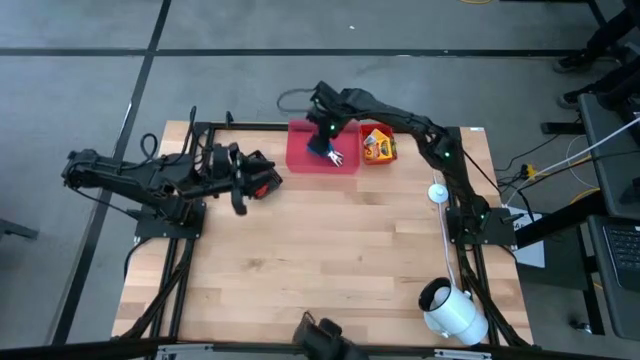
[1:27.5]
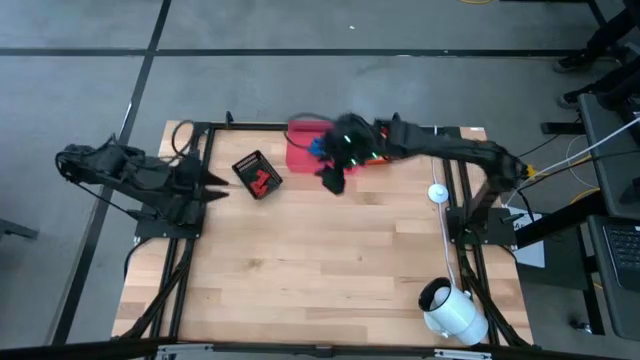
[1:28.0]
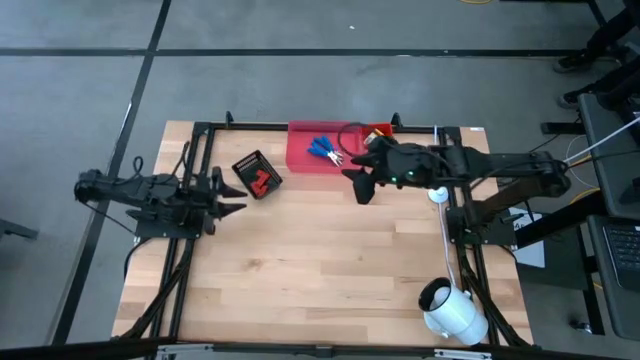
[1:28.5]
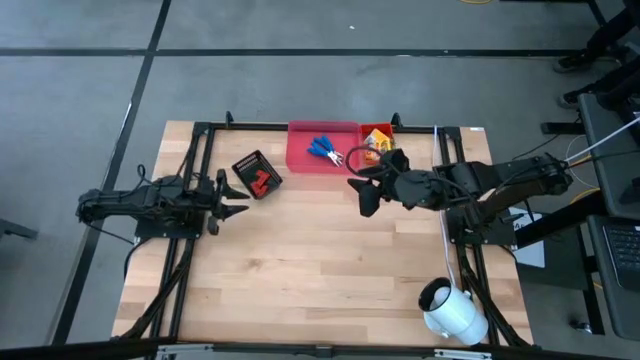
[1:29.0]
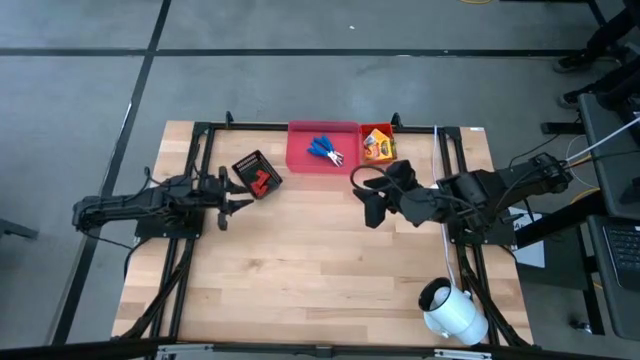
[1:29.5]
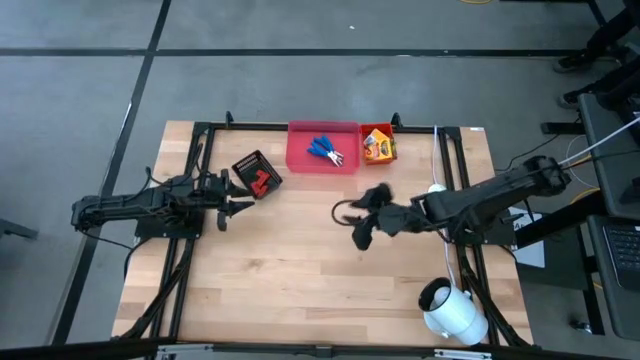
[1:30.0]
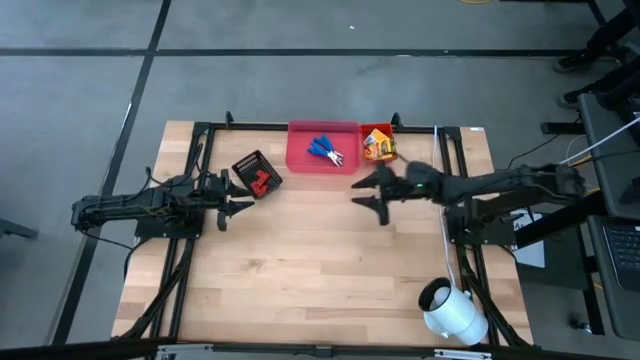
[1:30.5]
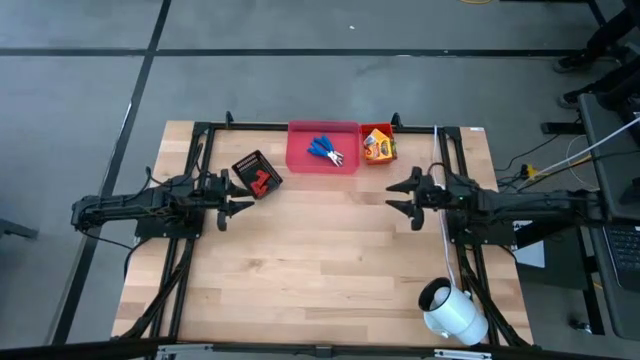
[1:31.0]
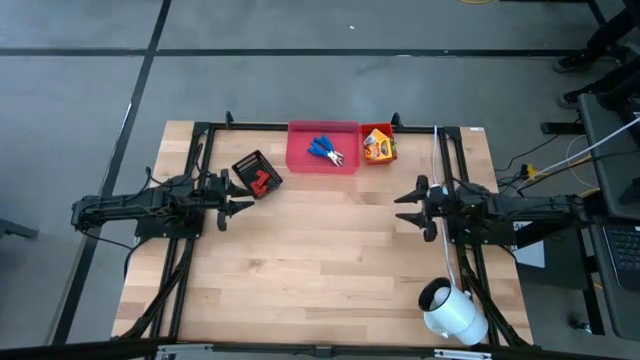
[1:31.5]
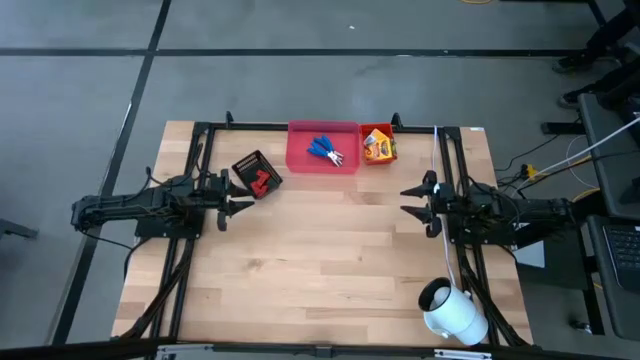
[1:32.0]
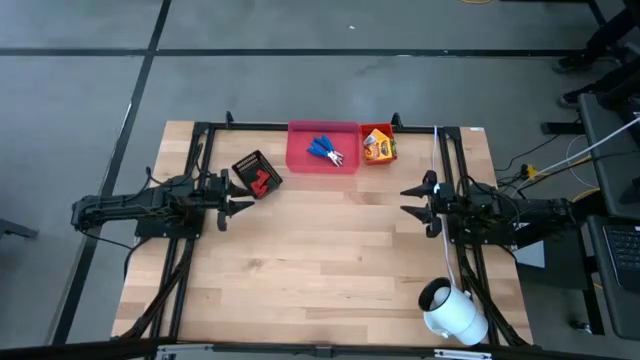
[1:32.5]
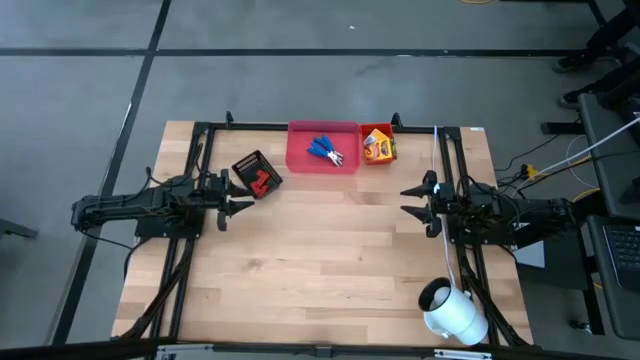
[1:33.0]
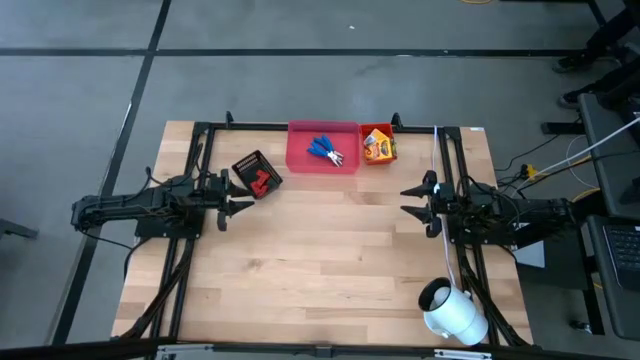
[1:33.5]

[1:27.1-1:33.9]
Task: Pick & Place School Supplies
Return to Home Position

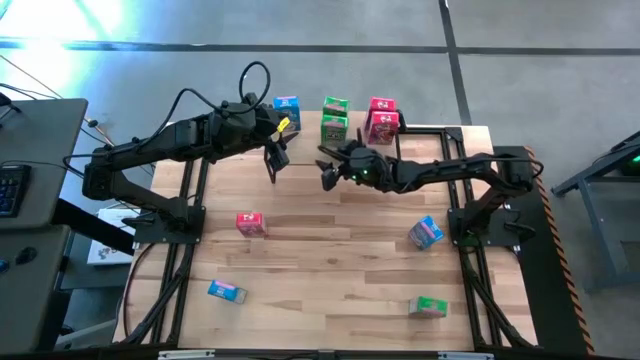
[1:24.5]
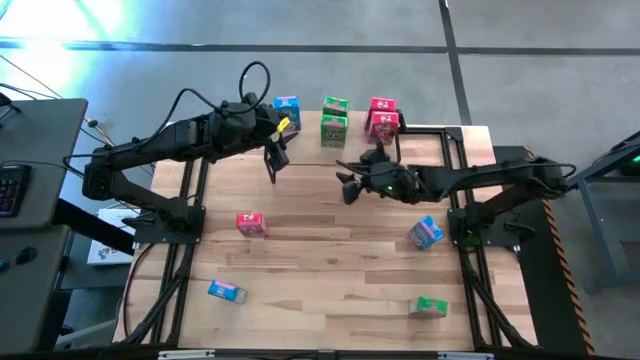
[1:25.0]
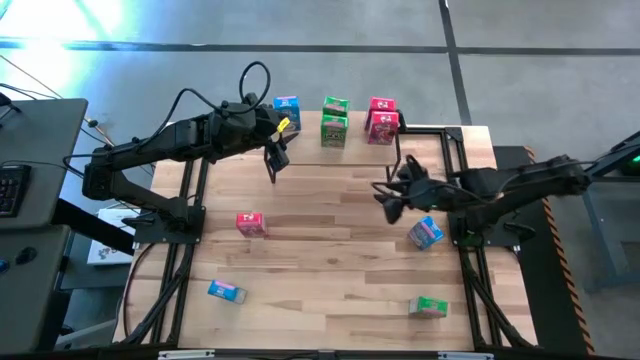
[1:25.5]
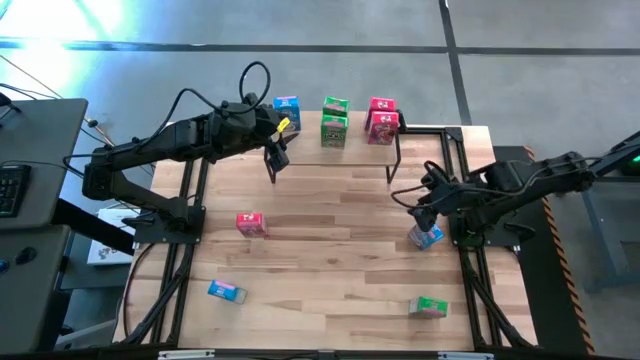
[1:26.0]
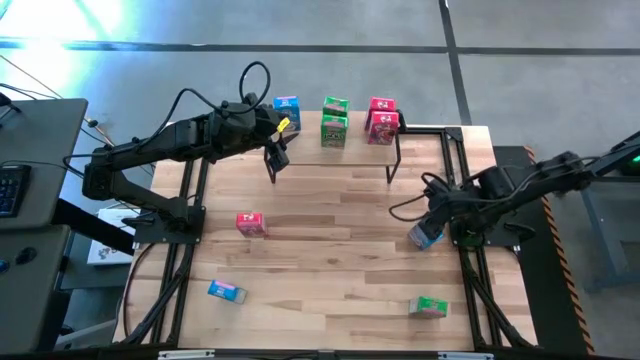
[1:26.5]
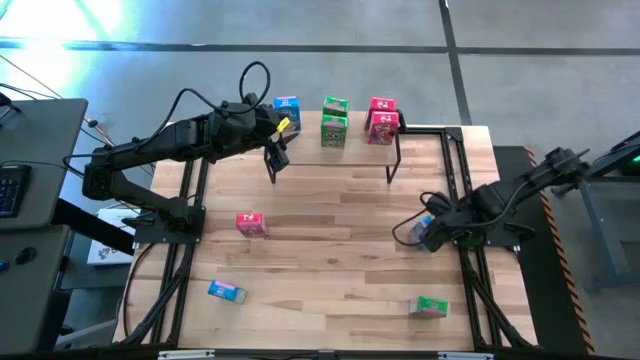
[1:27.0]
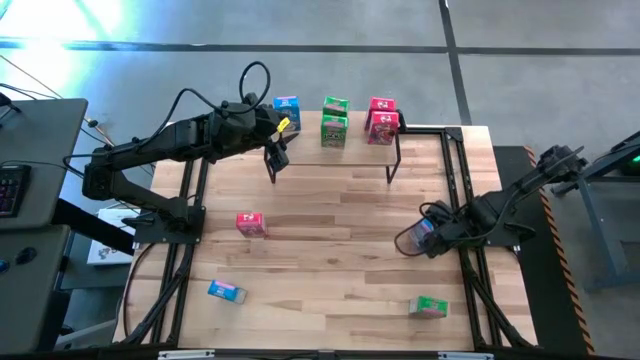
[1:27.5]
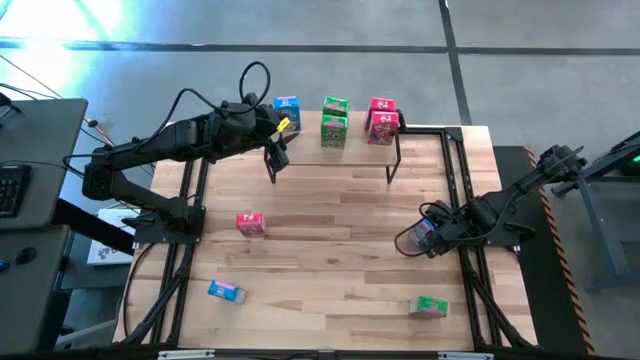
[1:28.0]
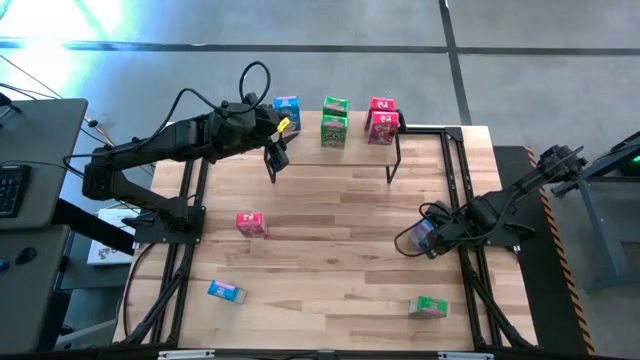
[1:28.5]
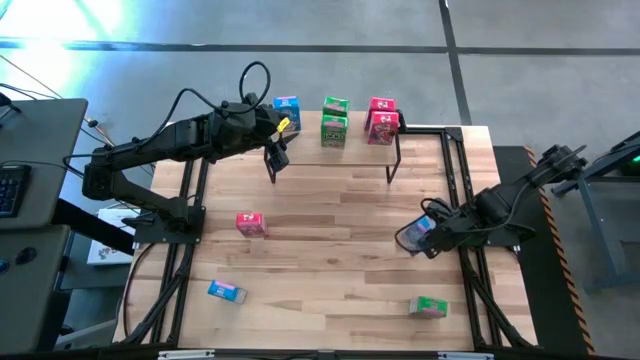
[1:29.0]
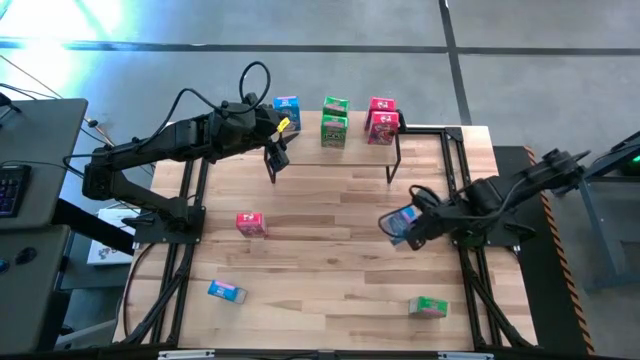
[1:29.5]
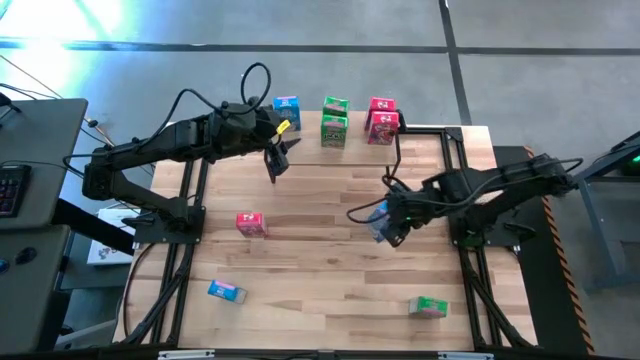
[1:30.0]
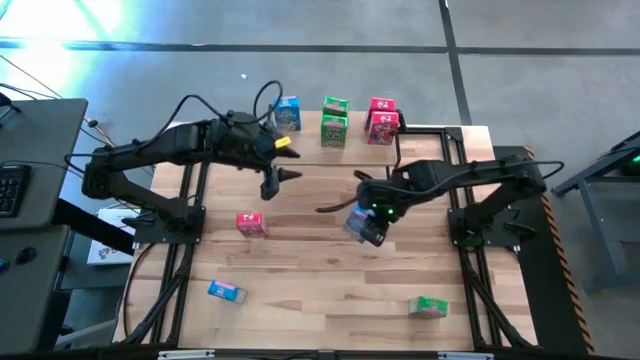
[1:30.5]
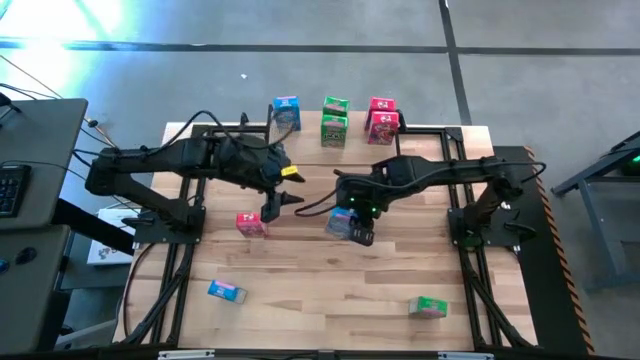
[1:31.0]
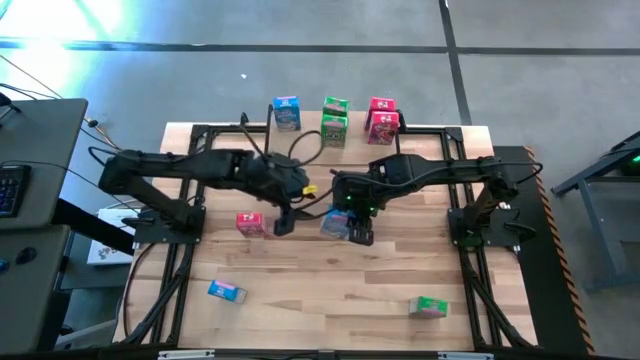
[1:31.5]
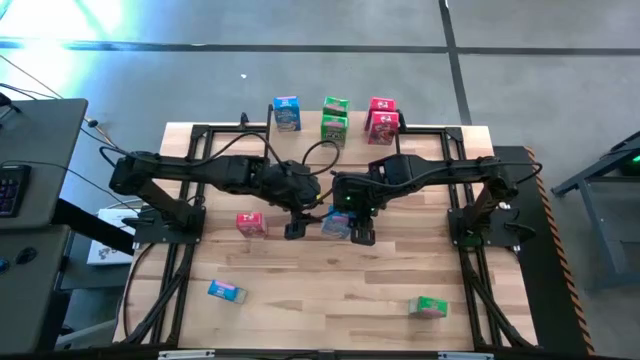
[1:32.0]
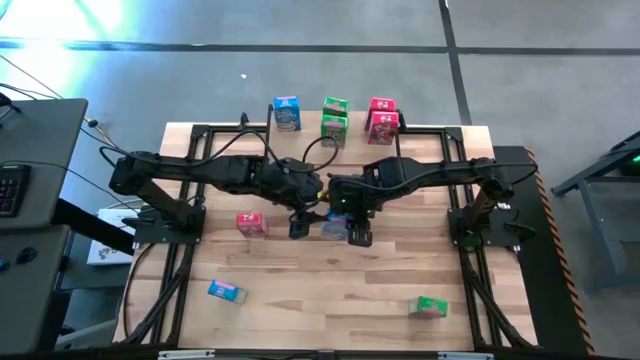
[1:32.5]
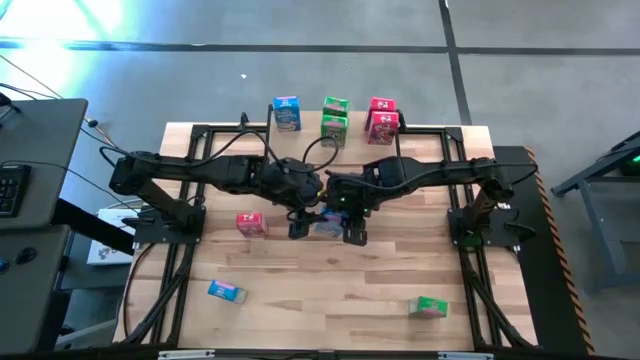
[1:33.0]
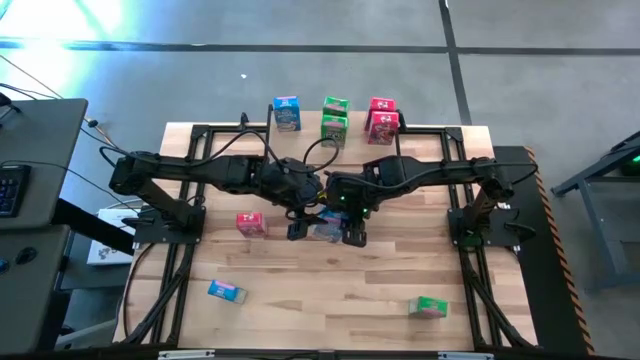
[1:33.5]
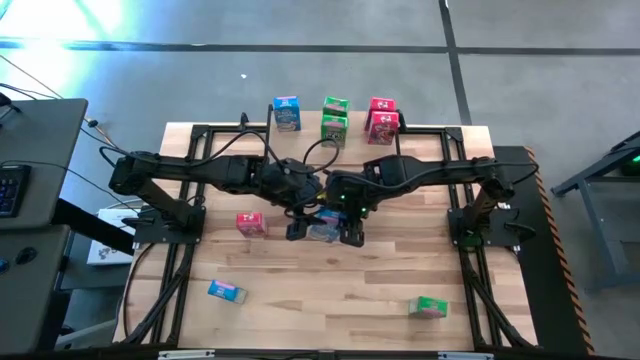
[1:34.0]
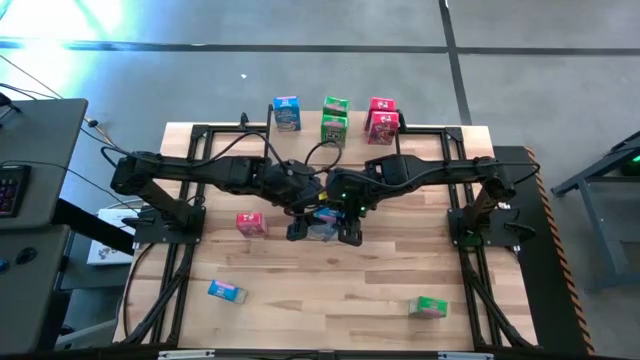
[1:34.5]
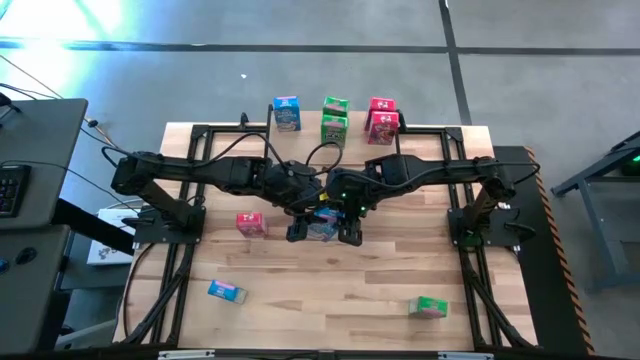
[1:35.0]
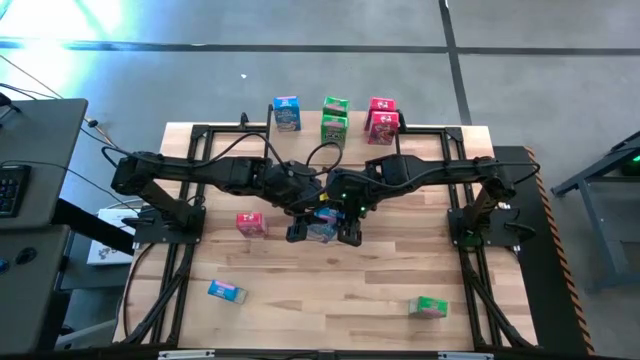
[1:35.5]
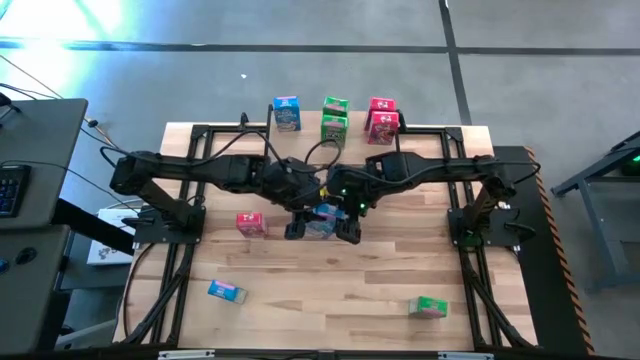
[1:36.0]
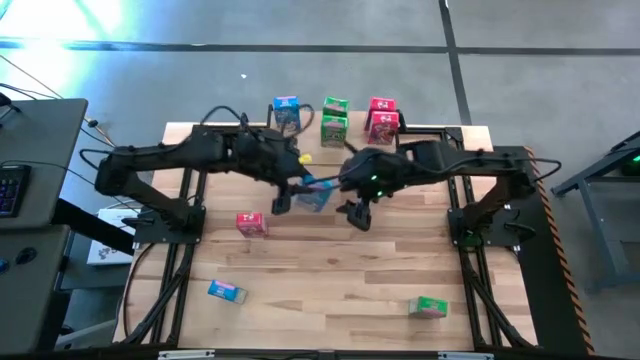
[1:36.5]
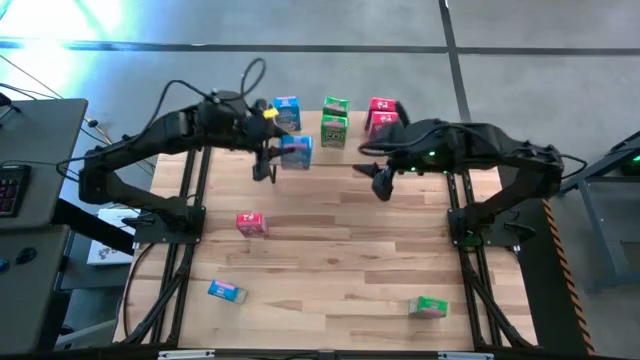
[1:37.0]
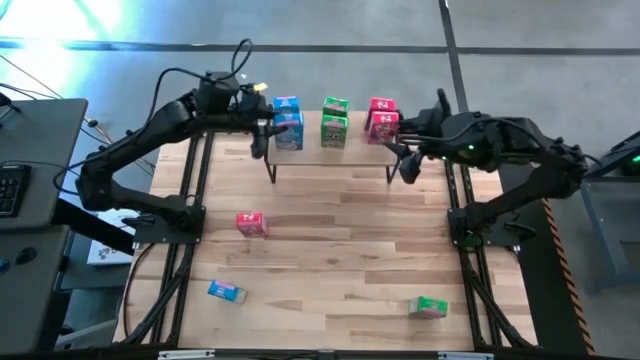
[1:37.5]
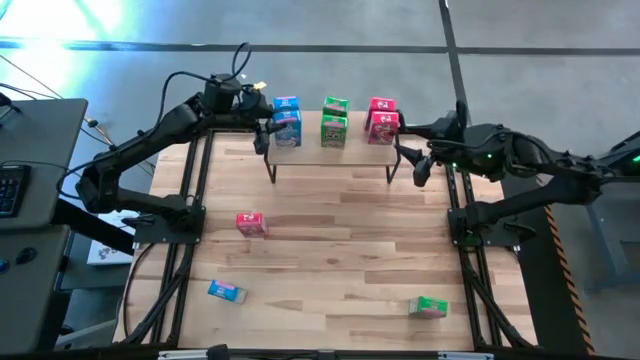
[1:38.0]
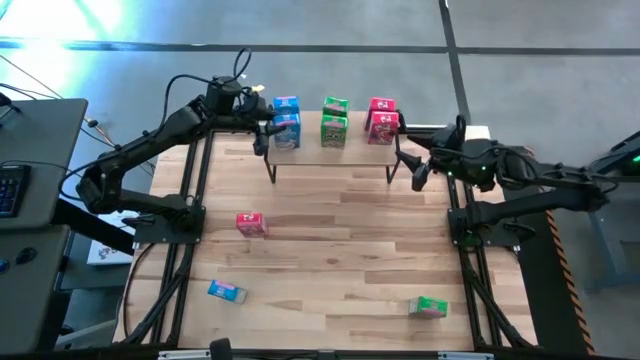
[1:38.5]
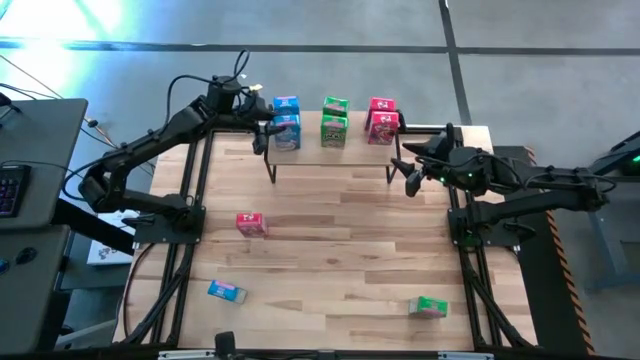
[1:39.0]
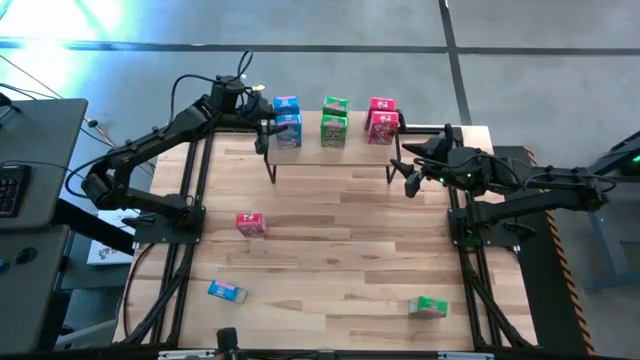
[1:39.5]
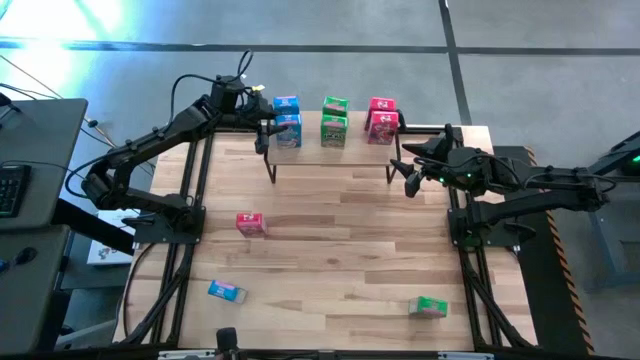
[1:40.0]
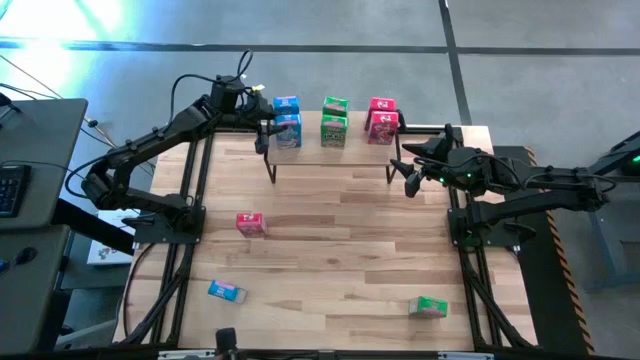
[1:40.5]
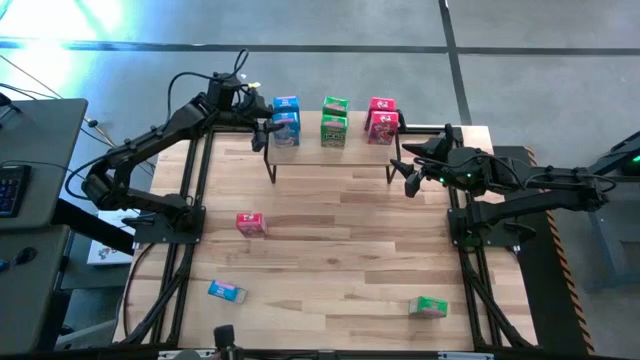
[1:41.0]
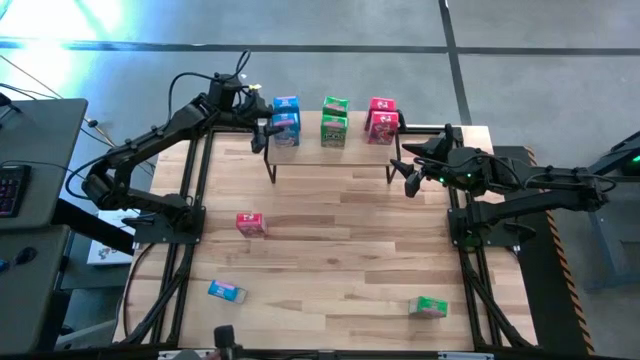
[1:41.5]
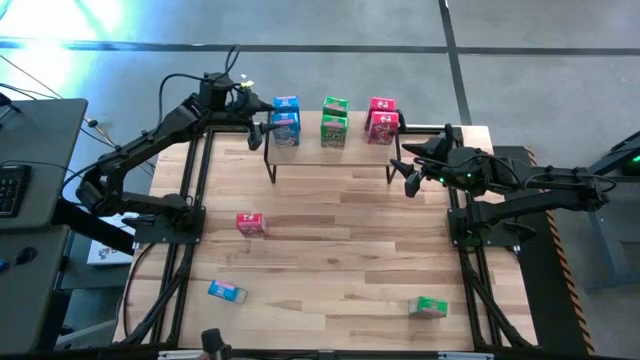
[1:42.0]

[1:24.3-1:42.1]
Task: Stack cereal on shelf
Put the top blue cereal box aligned with the other blue cereal box on the shelf
